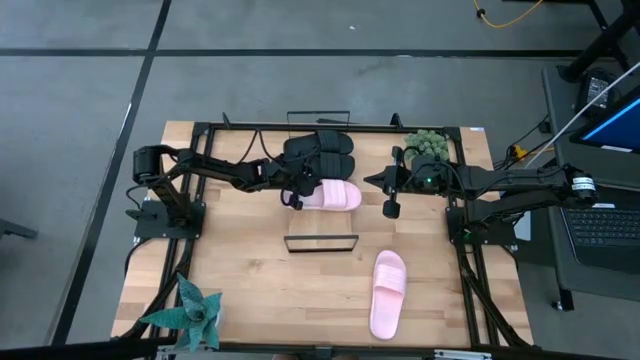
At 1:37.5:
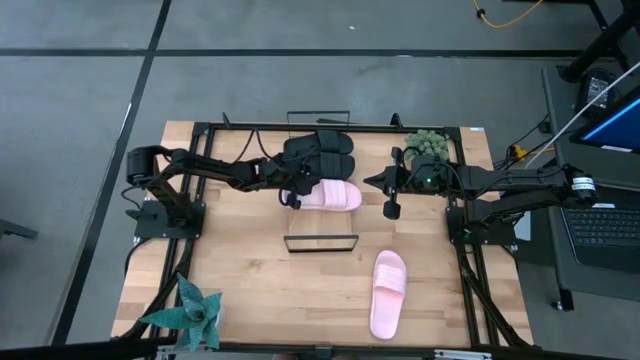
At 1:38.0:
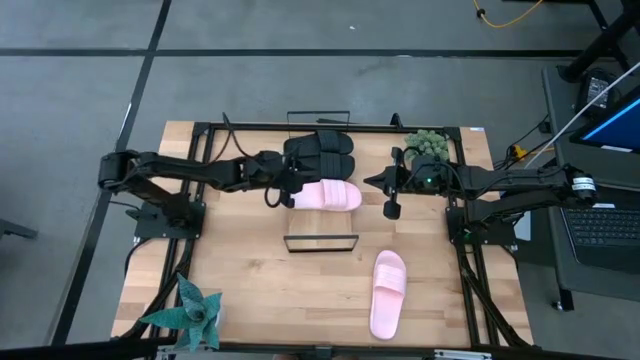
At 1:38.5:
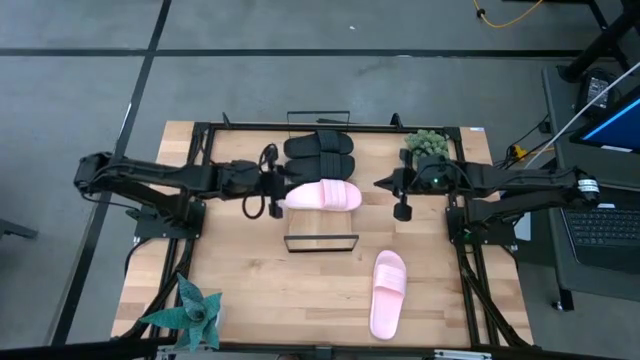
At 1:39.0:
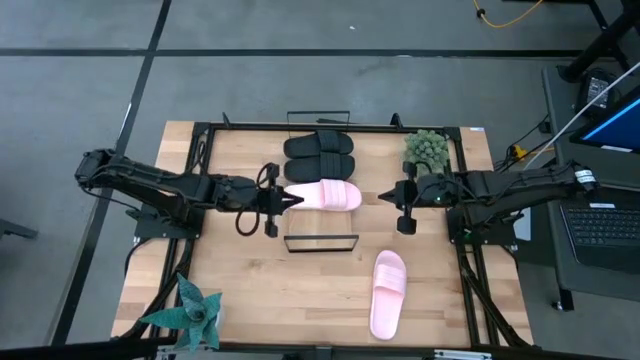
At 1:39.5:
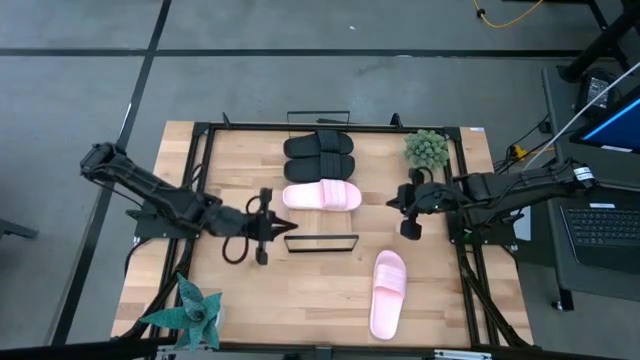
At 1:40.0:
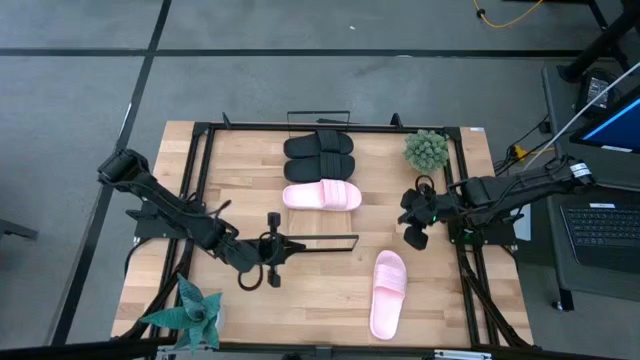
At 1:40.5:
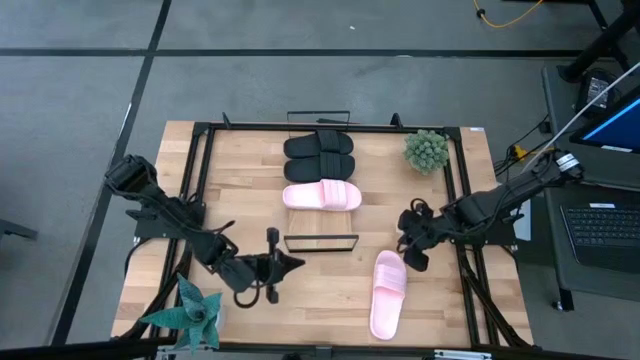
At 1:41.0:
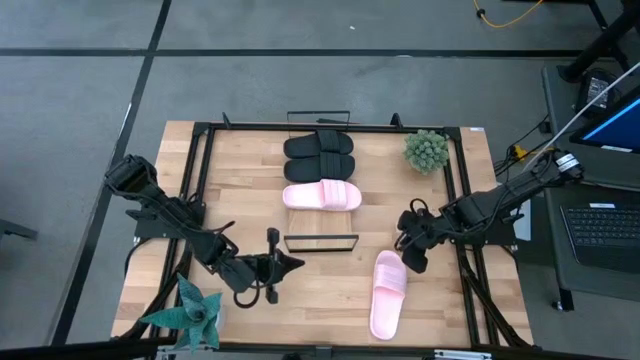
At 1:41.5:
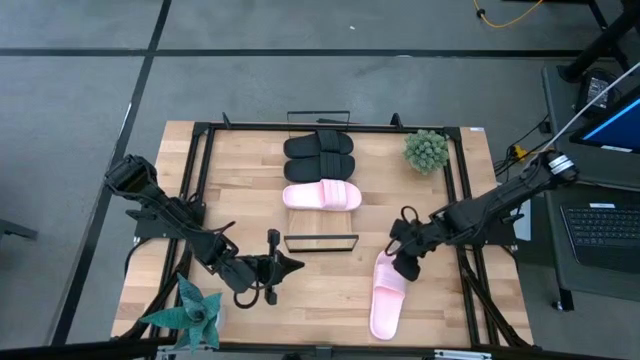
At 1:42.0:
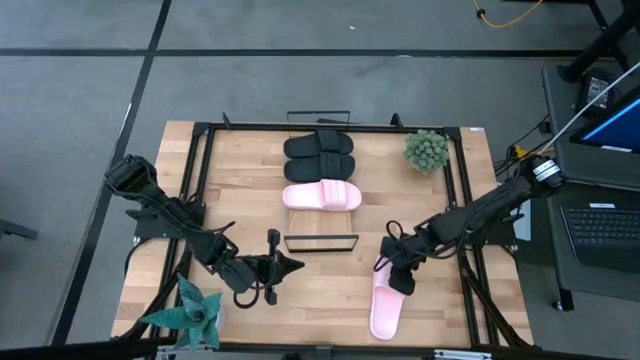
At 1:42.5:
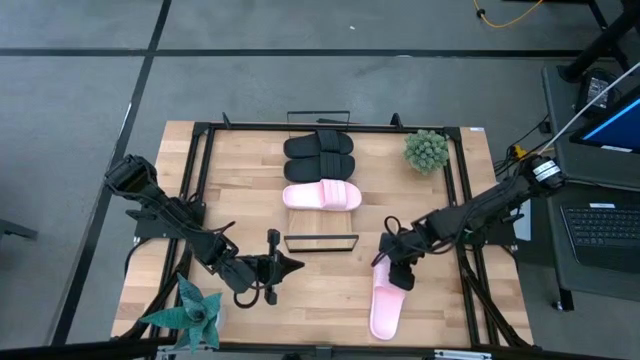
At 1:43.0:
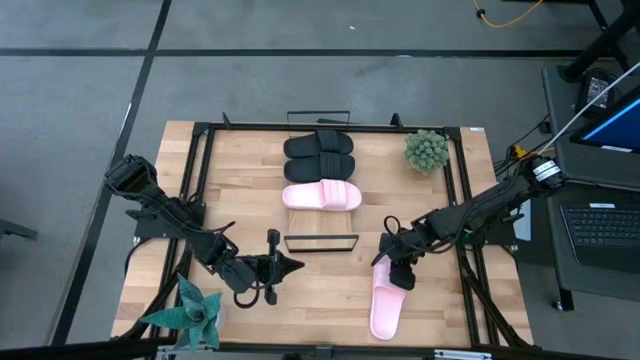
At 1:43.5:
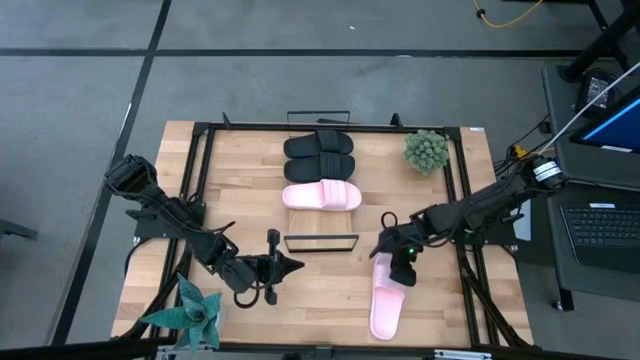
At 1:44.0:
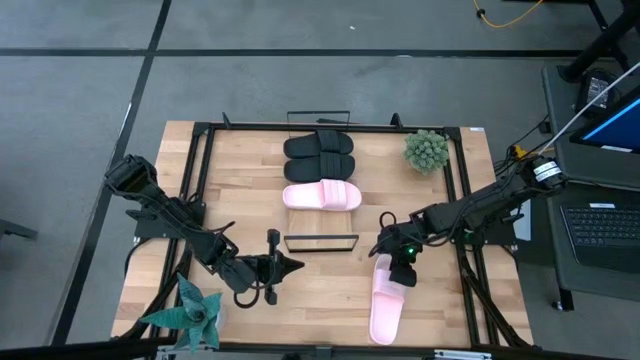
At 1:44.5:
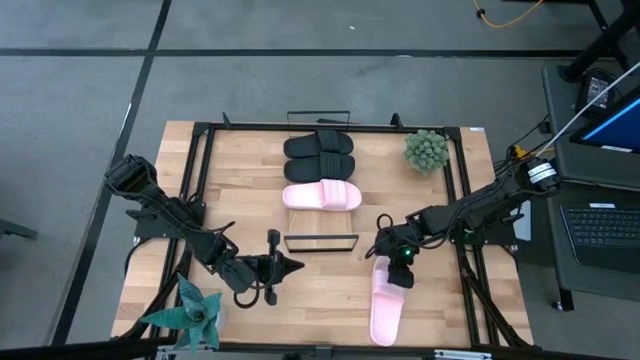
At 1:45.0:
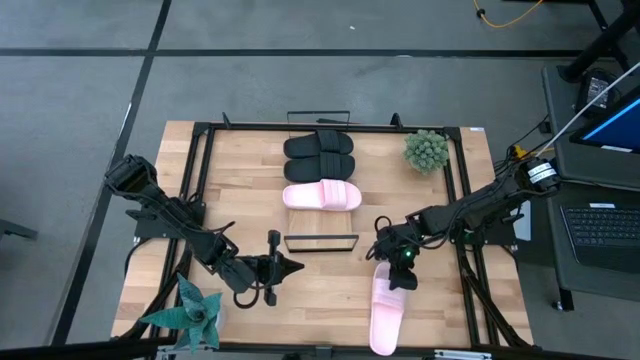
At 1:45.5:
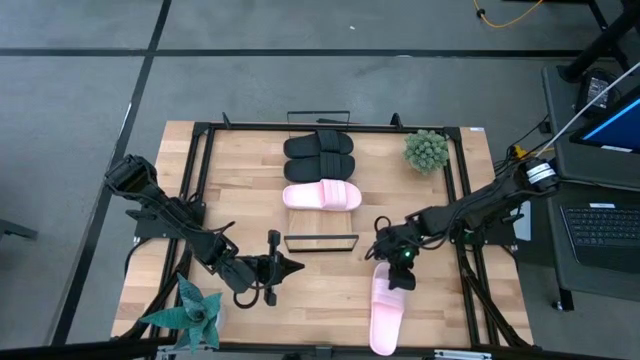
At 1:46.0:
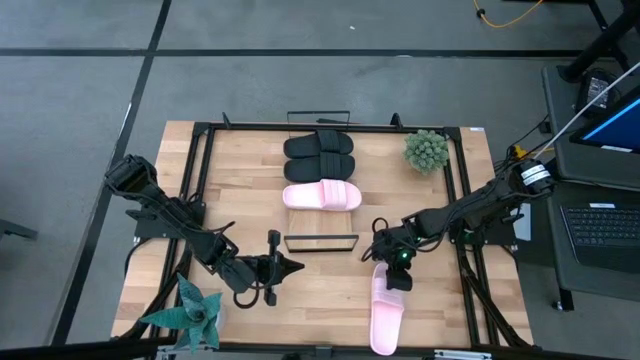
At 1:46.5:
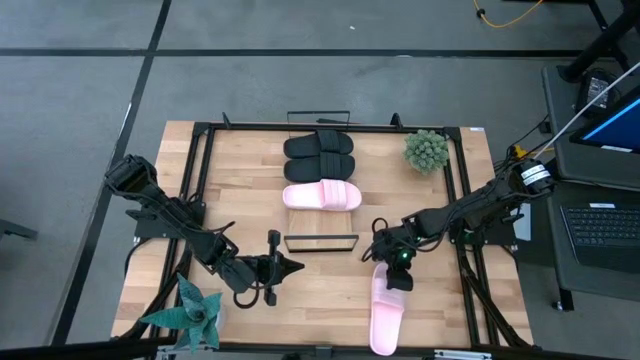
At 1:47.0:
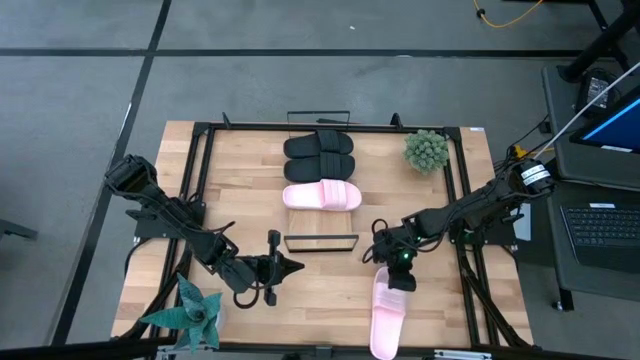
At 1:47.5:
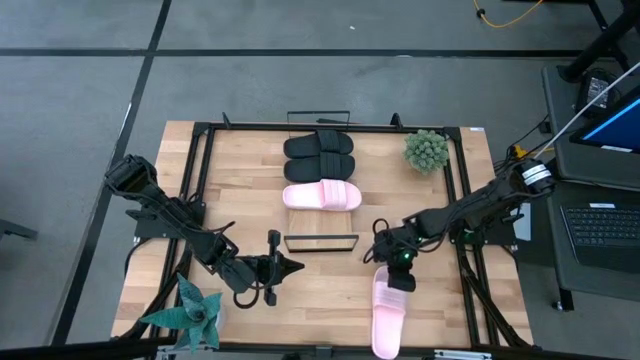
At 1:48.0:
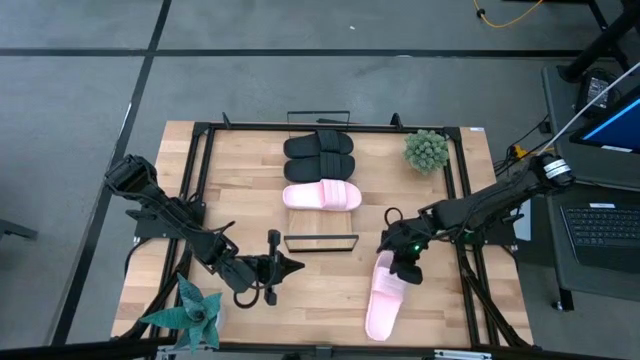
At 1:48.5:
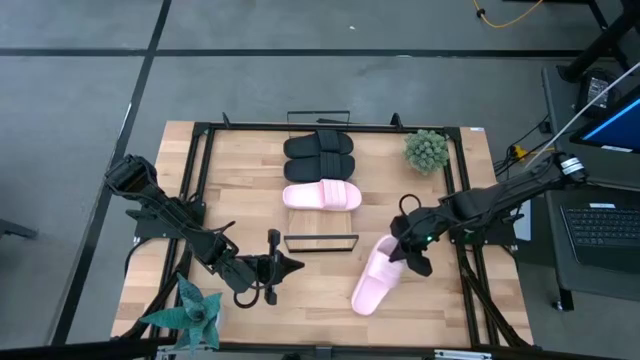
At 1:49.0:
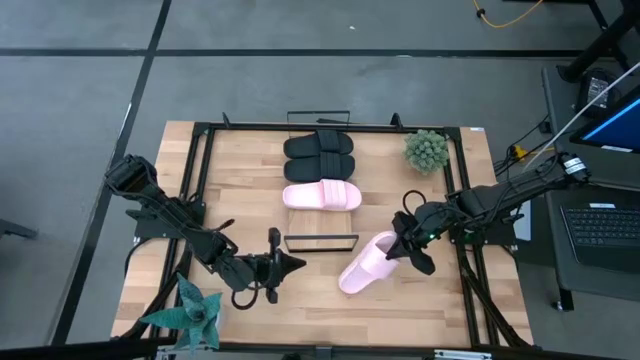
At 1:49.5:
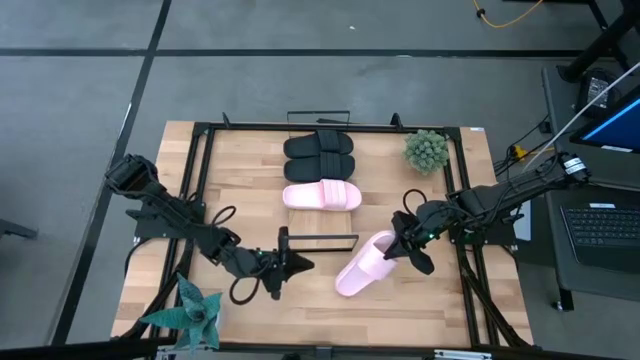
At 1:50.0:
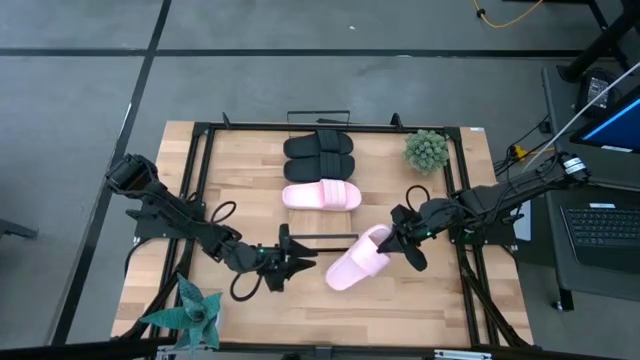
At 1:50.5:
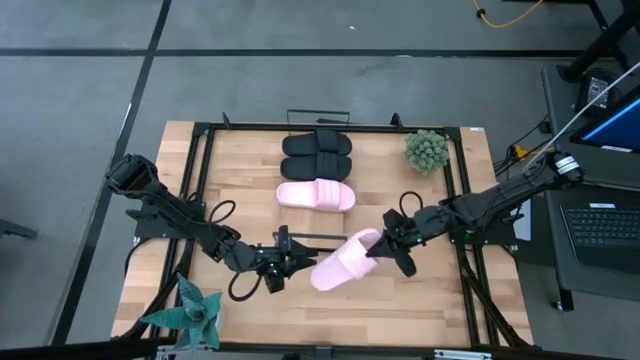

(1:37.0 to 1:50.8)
Task: Pick and place slides into the shelf
Put the pink slide on the shelf

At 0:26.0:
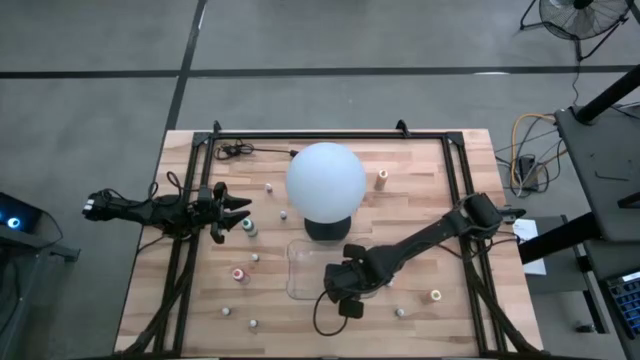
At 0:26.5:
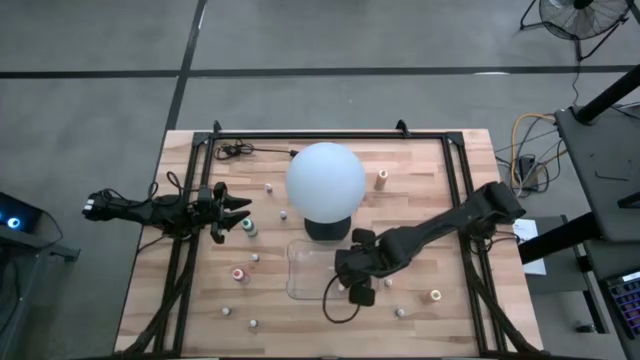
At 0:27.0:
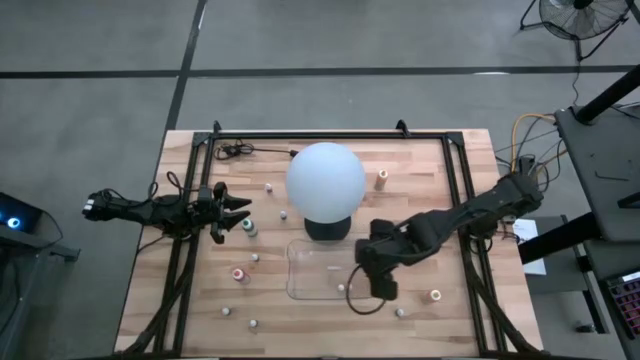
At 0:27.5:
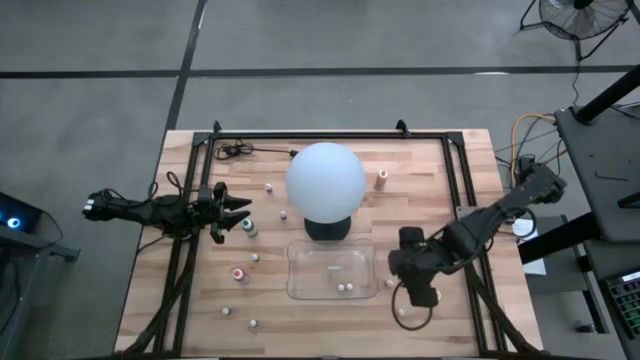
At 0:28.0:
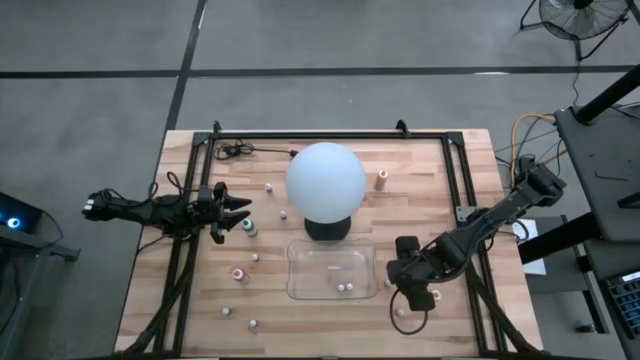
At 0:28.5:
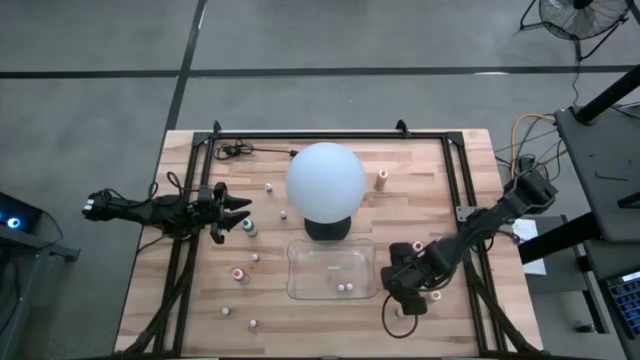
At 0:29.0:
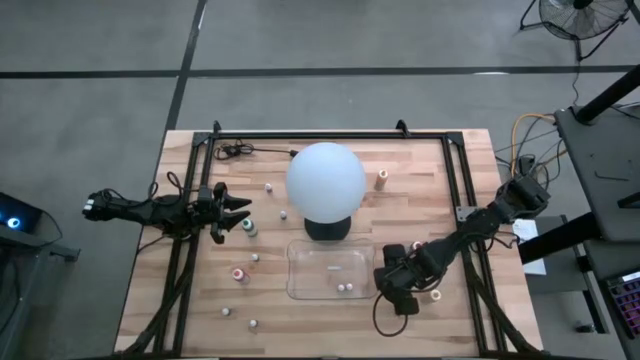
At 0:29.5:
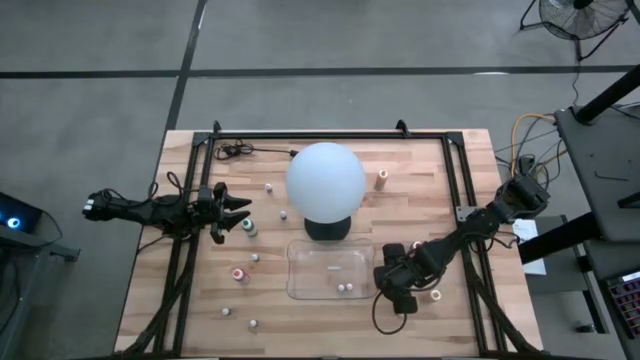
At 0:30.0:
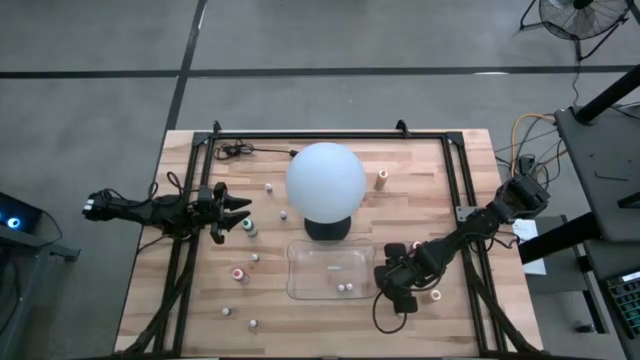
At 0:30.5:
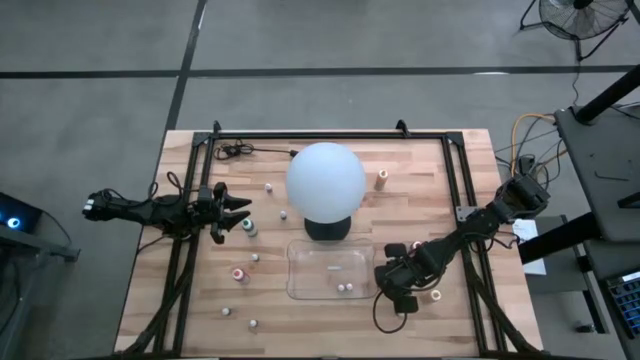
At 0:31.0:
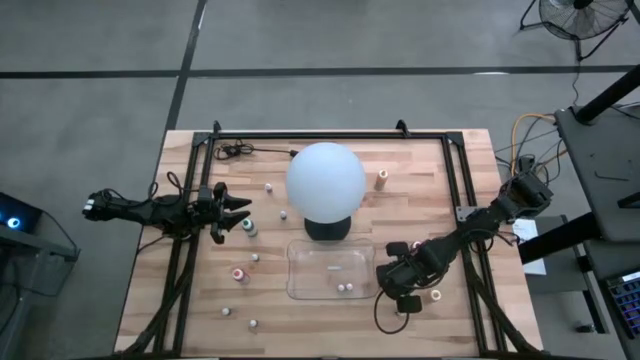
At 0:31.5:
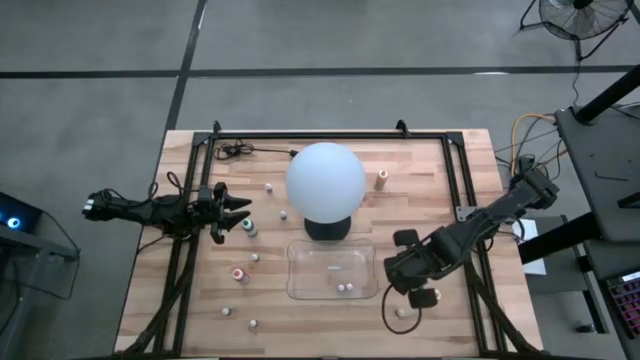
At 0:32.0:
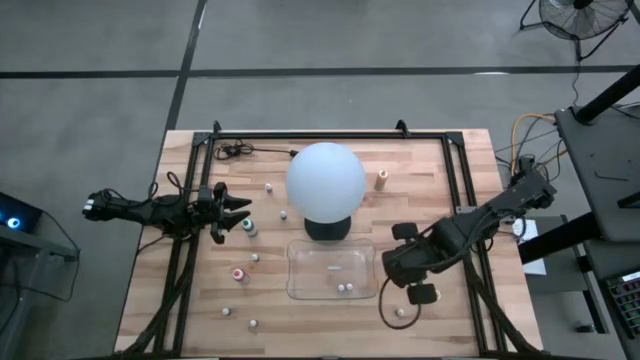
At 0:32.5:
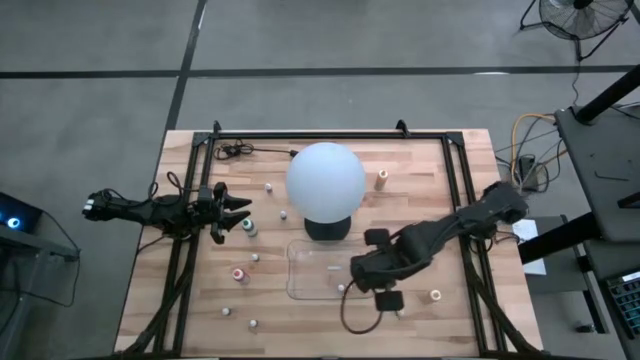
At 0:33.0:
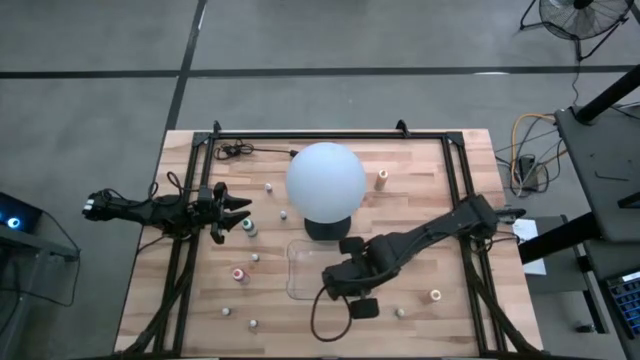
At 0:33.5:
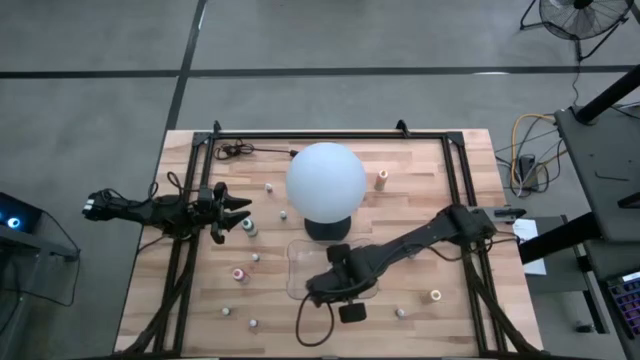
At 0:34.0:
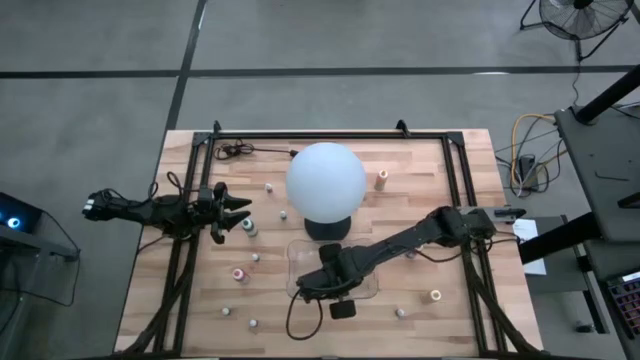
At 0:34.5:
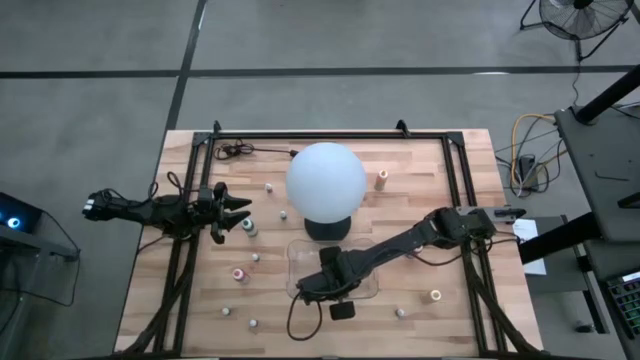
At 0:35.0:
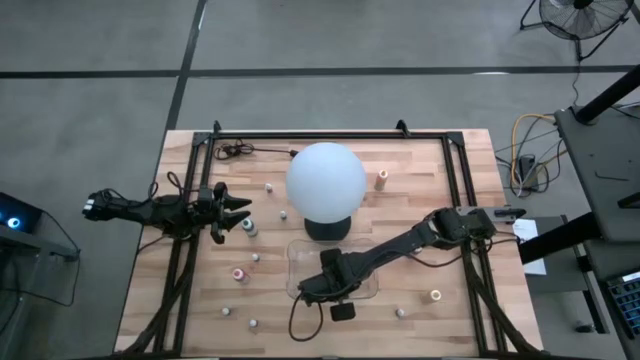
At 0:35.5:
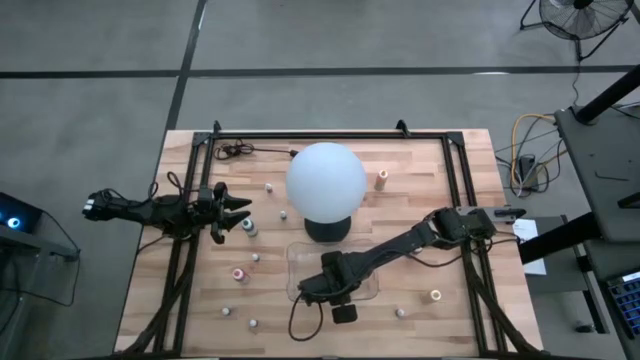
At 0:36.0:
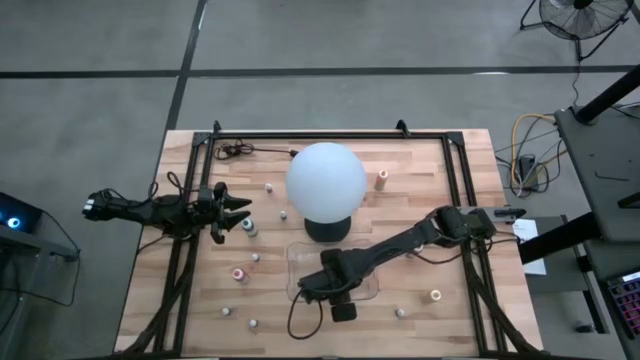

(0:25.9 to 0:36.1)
Task: Pick & Place food coloring
Put the top small green food coloring bottle into the transparent bin
